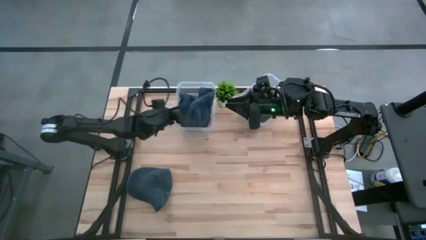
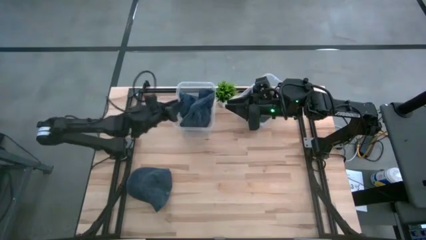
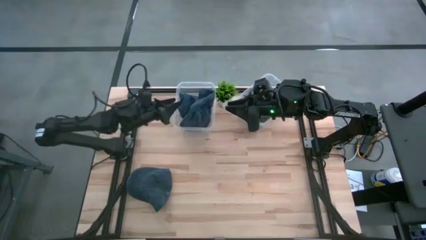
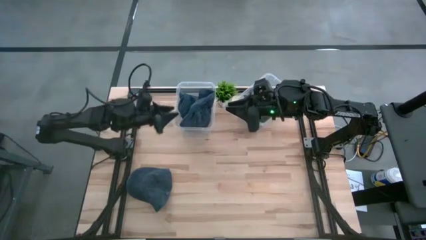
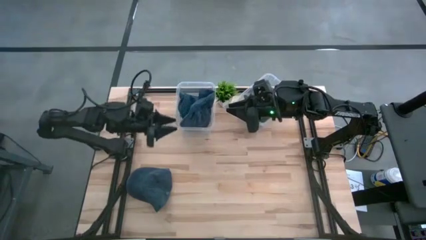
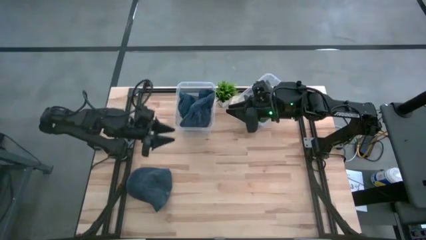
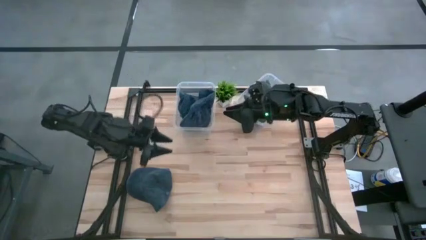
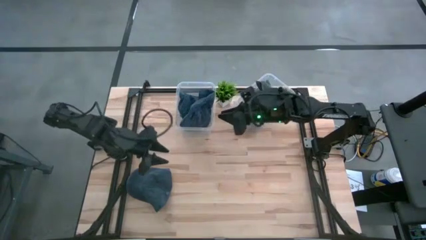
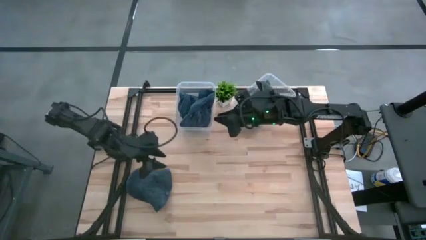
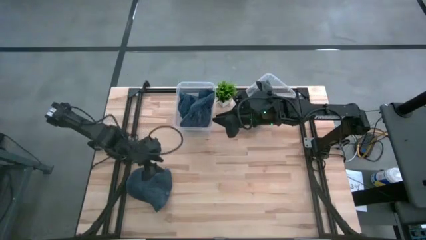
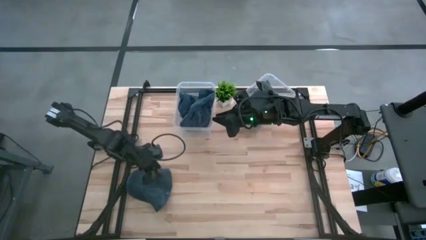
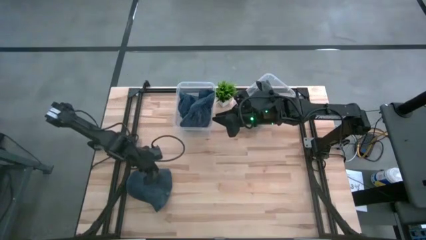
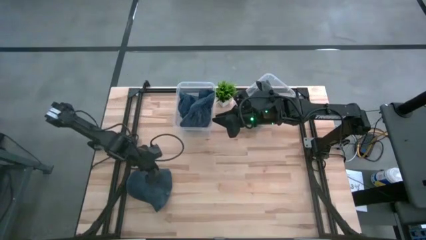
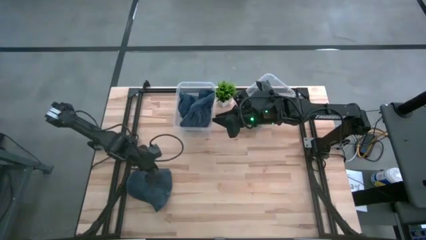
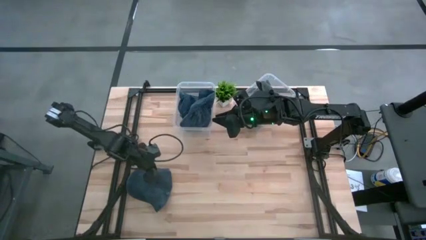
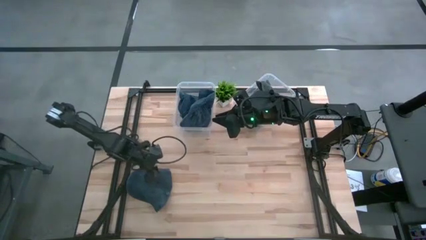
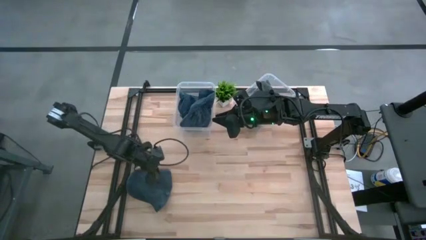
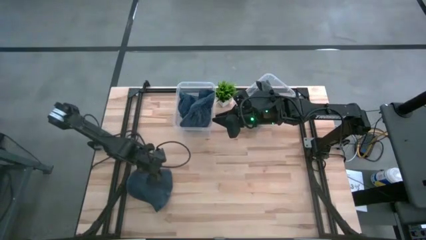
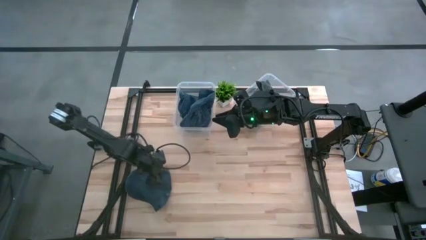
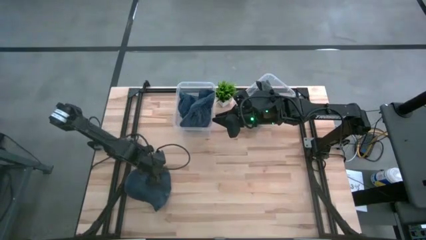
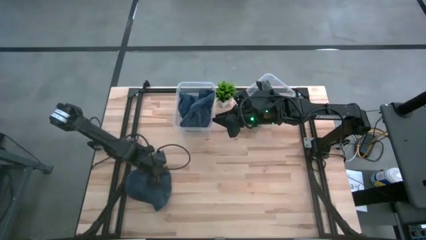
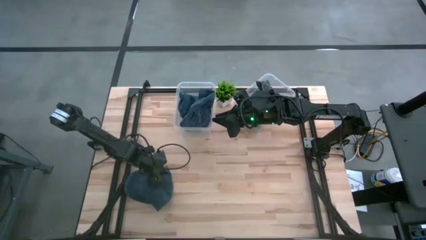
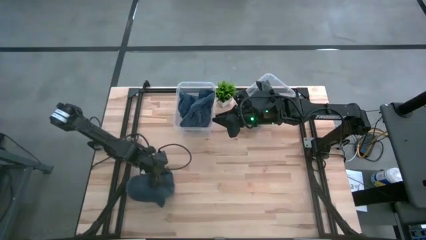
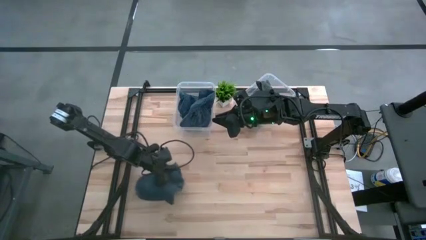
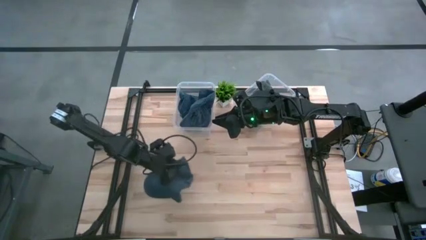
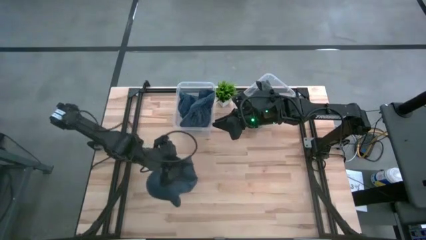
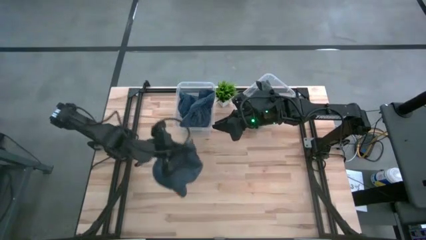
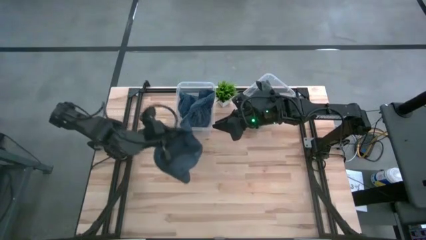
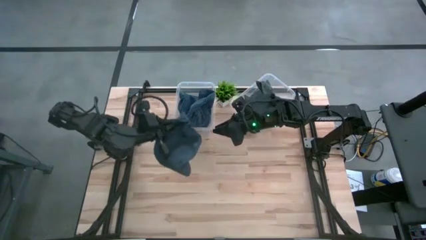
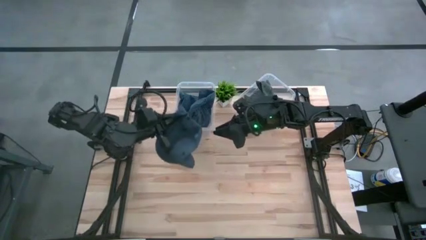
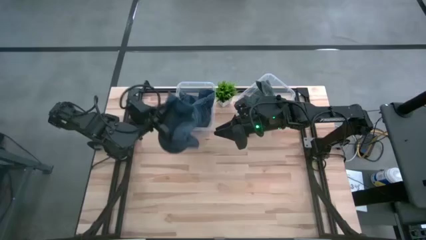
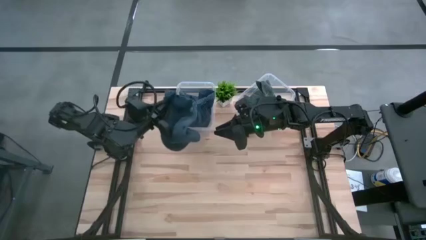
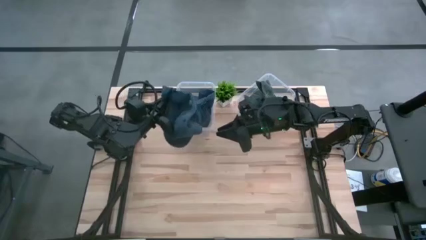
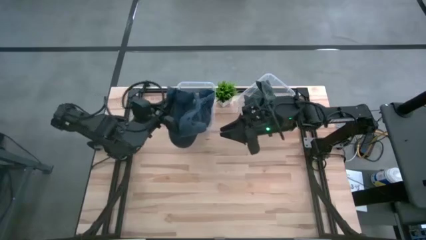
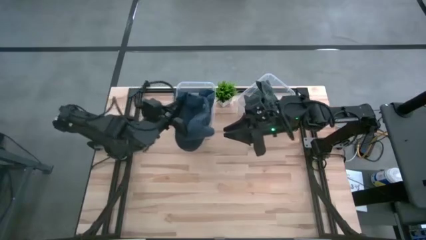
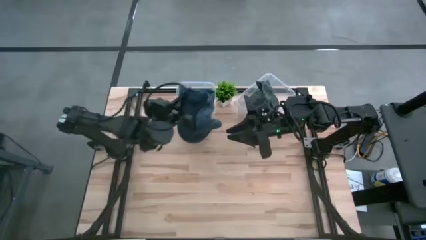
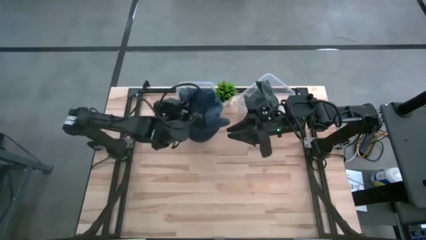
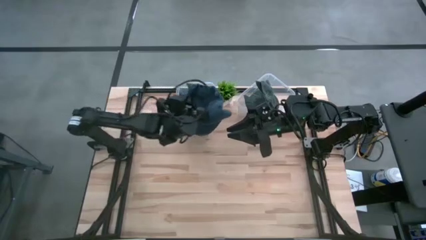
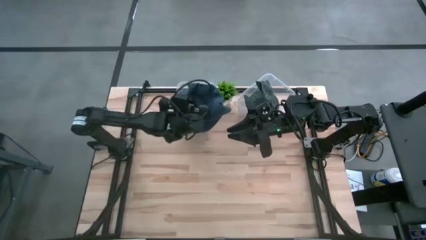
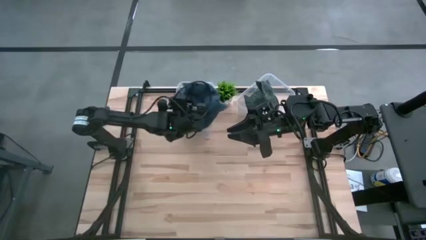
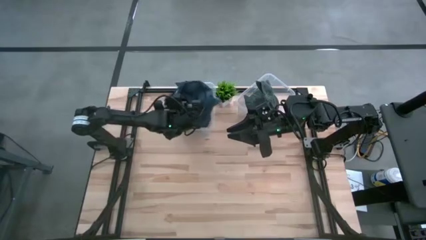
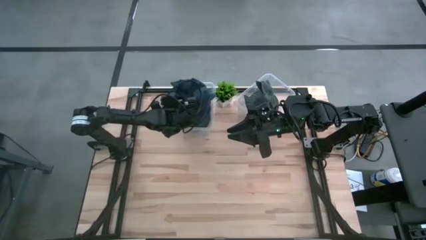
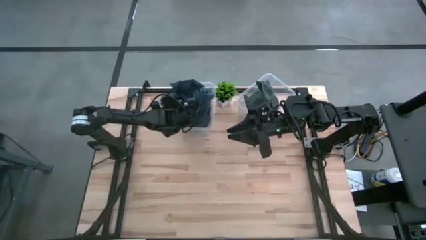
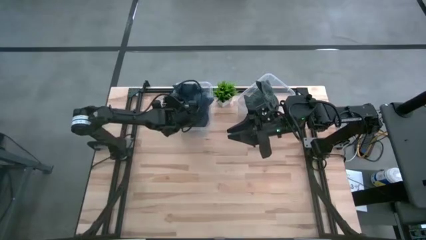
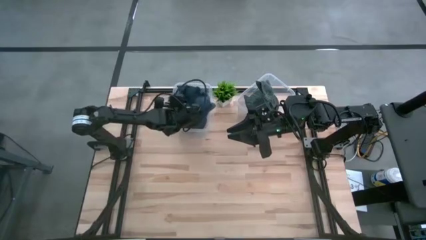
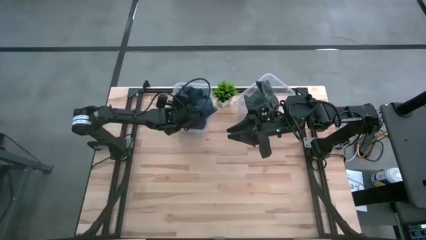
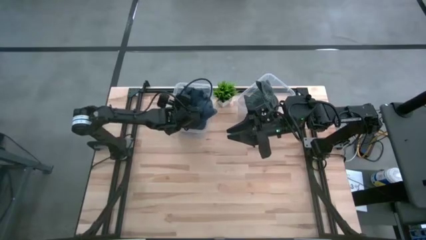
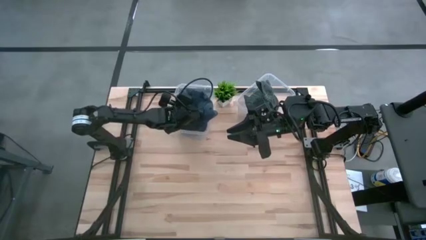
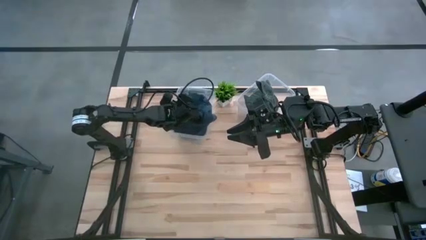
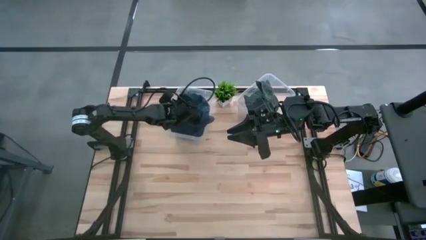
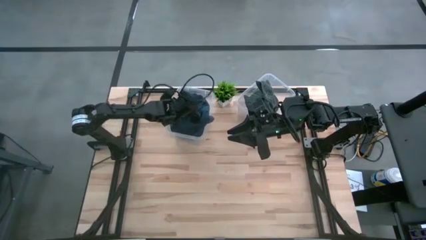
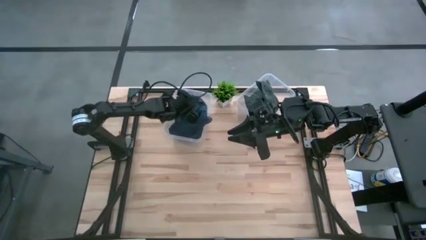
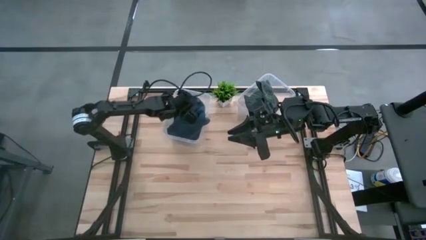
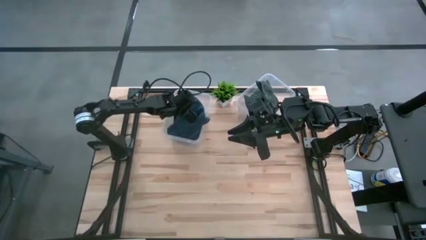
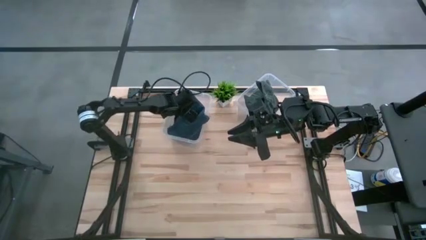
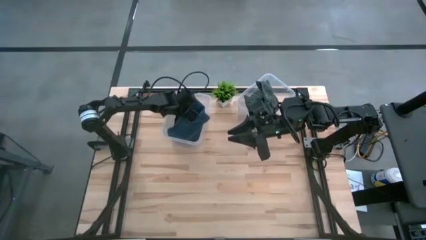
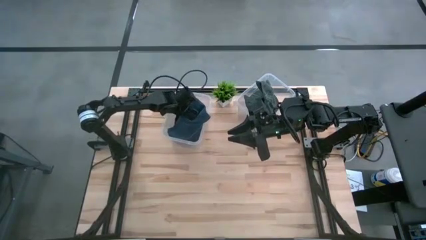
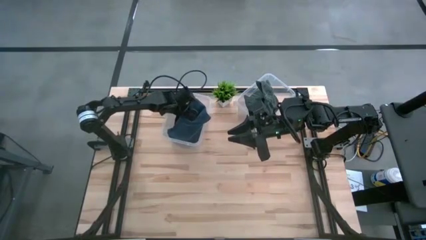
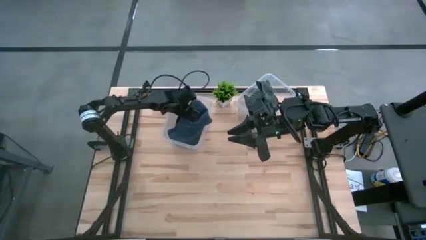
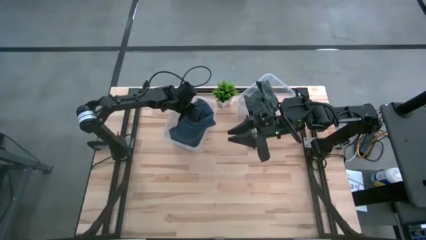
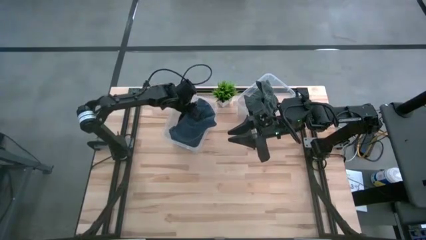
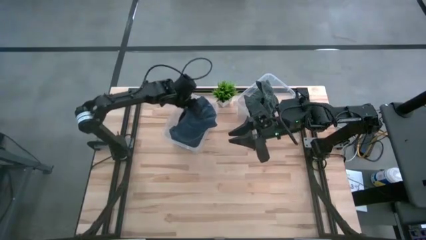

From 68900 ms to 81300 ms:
Task: Pick & Place hat
Put the blue cap in the left transparent bin
